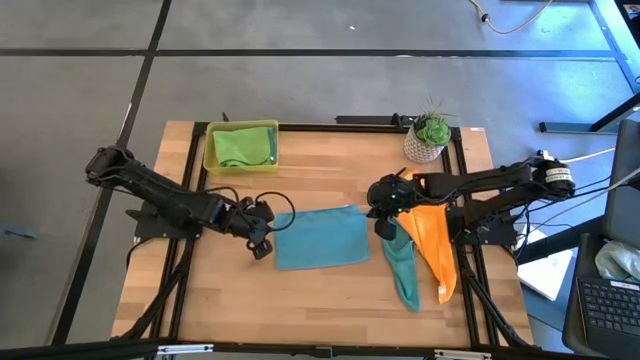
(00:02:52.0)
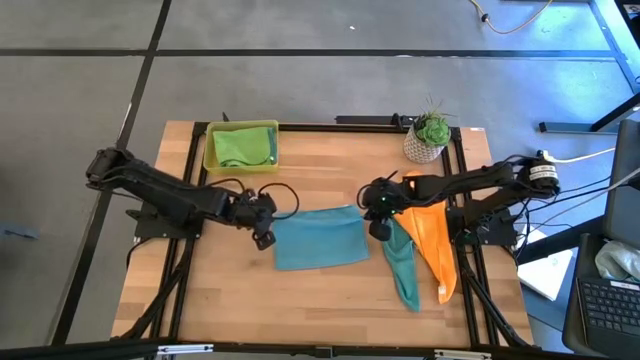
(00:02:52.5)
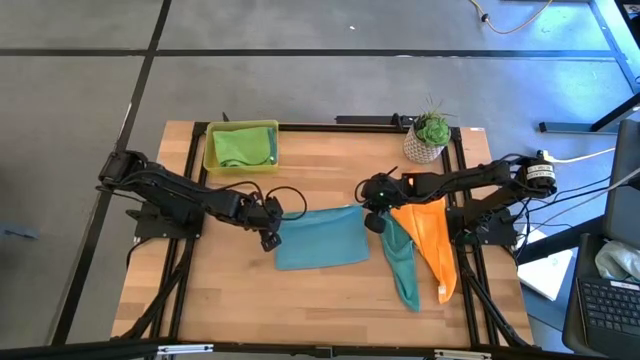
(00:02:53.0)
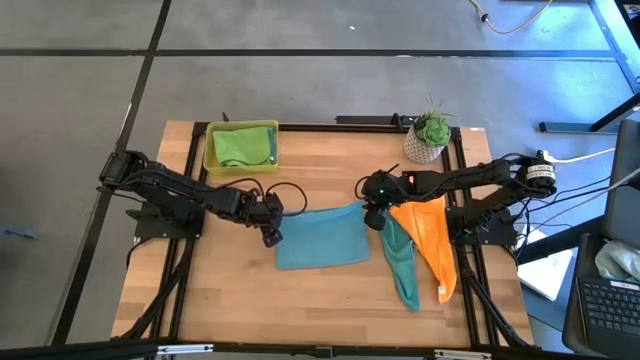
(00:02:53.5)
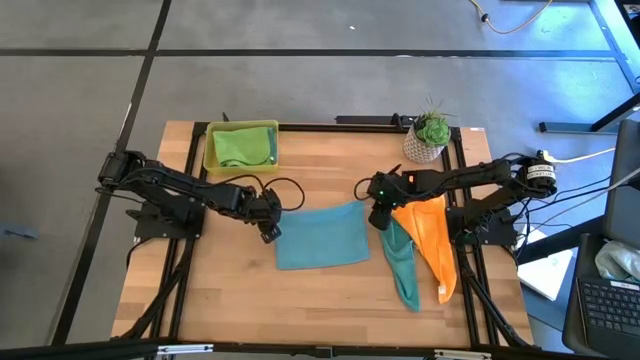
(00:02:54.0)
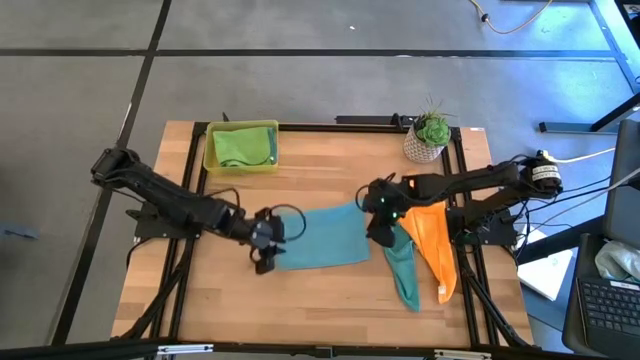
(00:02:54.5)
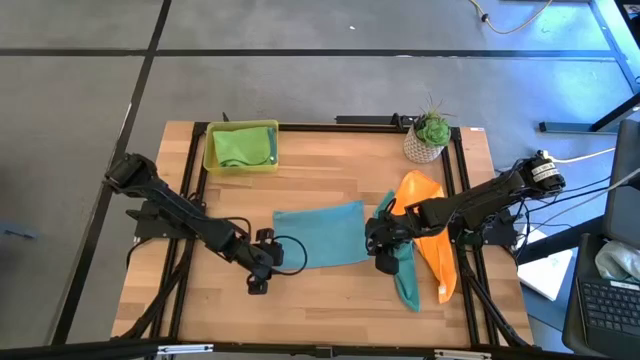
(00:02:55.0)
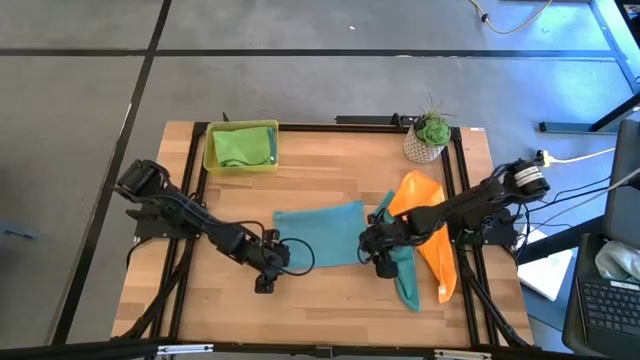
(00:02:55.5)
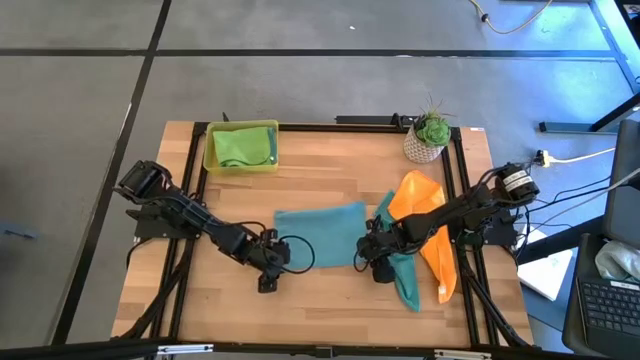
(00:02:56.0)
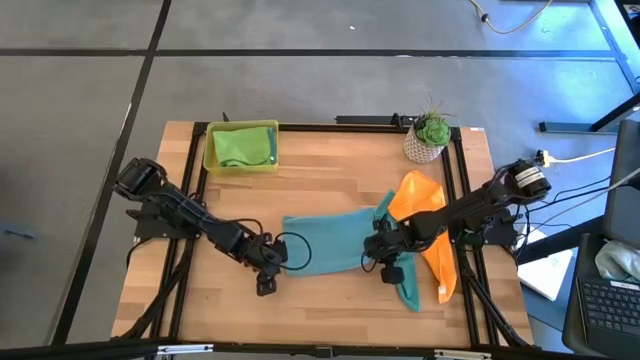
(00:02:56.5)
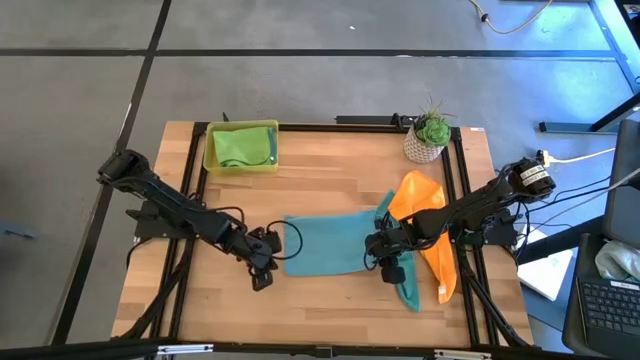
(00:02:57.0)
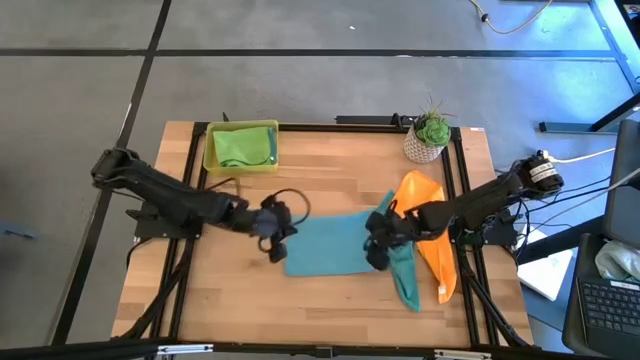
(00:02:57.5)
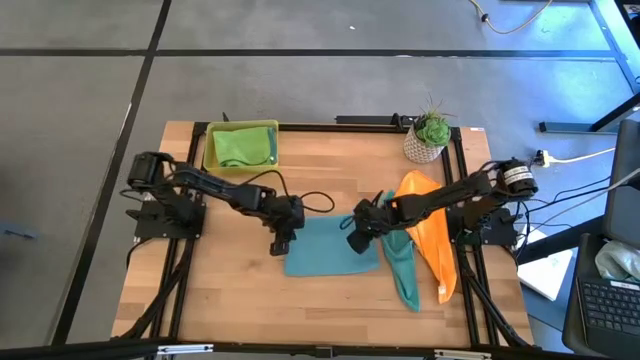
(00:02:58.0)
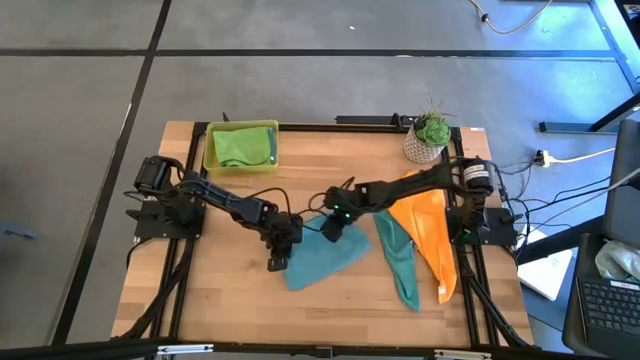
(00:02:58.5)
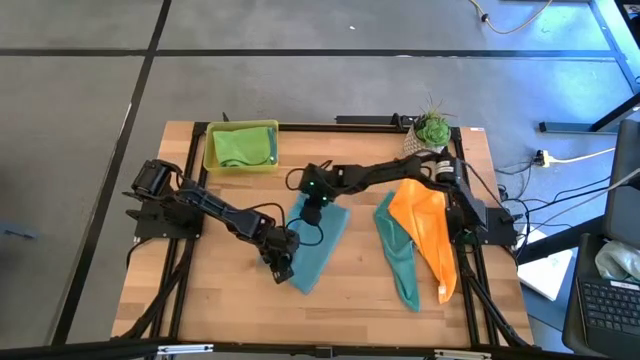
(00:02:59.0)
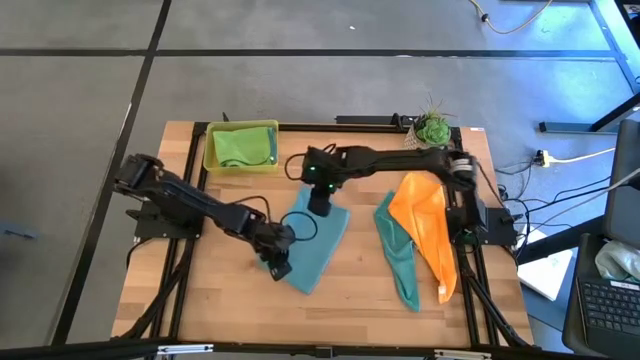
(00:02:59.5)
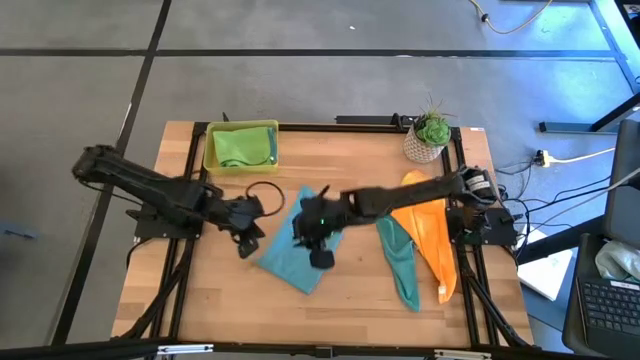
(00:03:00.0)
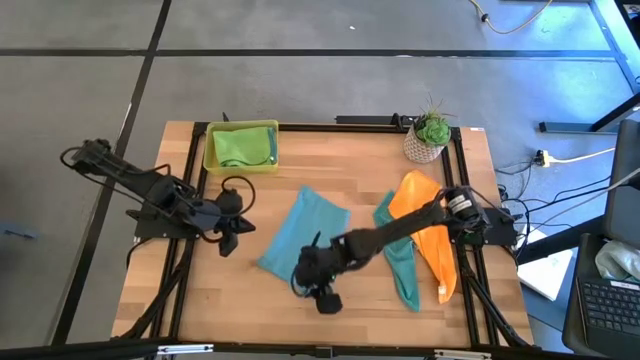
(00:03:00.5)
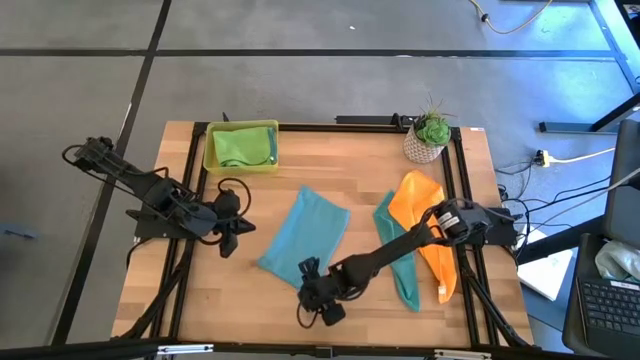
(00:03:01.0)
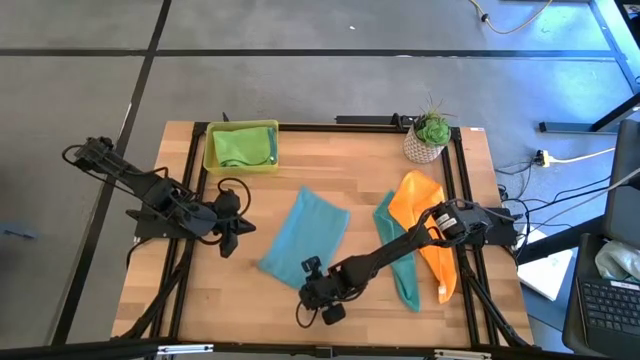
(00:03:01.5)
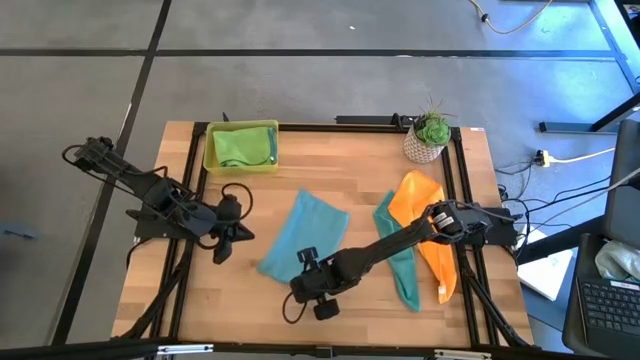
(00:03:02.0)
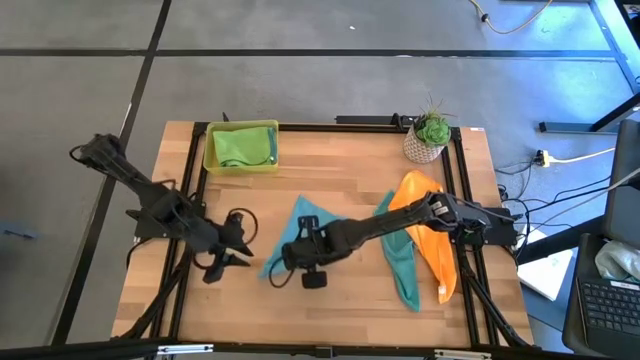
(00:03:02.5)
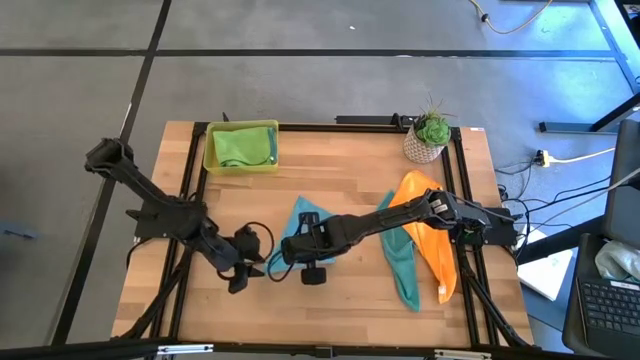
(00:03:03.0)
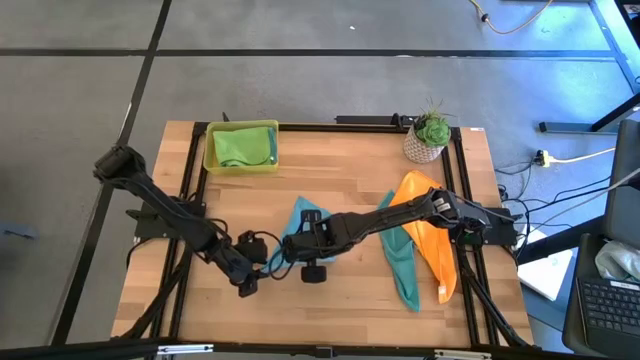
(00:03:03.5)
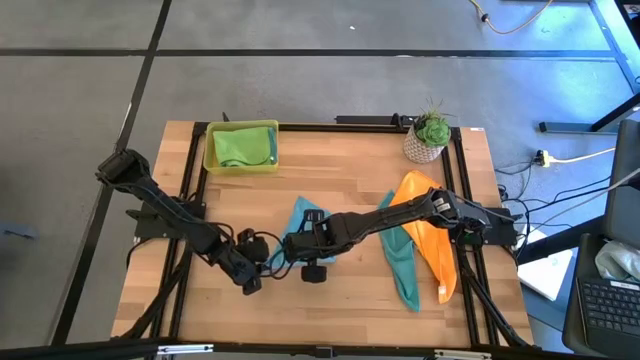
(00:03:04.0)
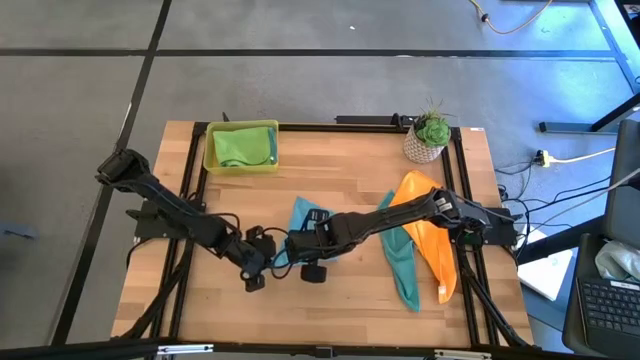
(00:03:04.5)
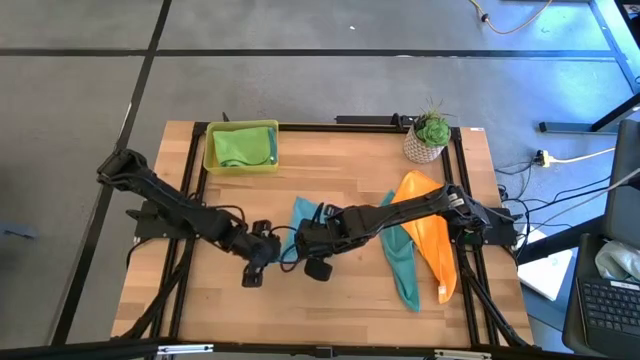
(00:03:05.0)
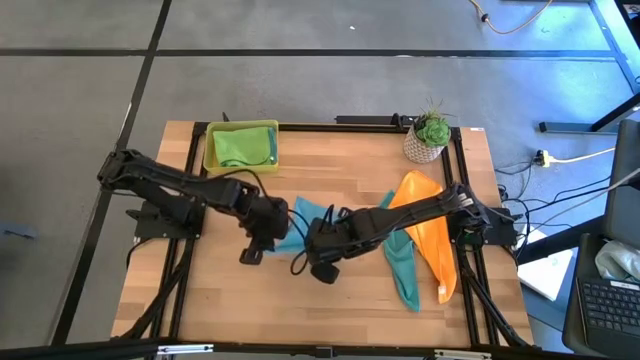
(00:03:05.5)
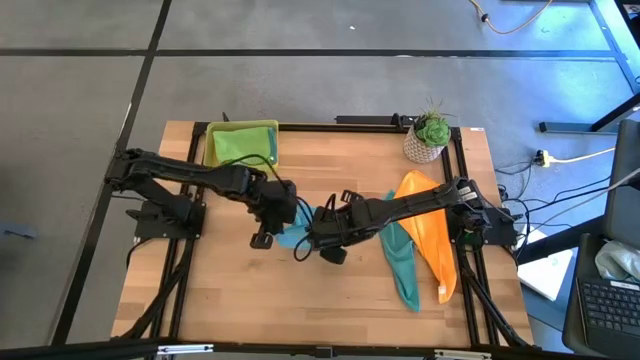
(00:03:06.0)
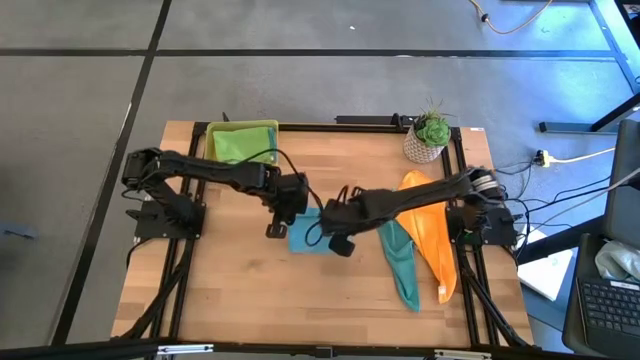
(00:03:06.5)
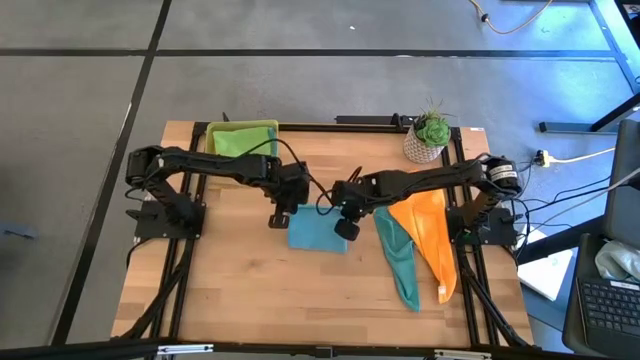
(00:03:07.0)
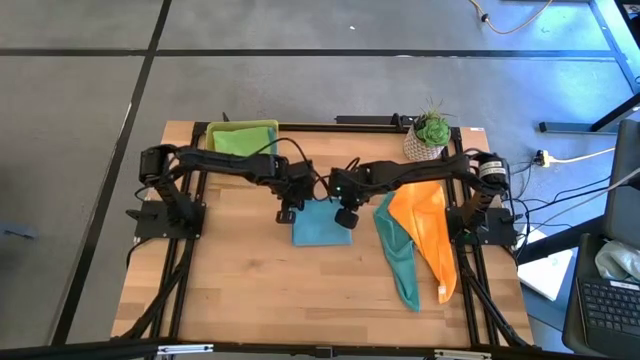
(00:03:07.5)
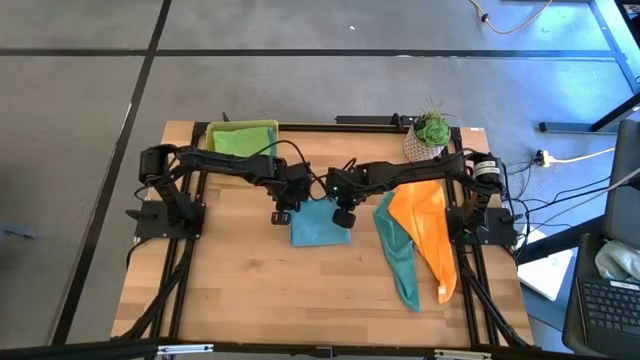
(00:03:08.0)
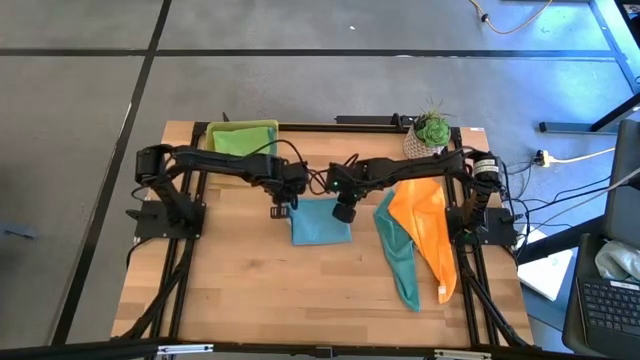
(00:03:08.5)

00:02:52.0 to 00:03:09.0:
Task: Fold microfiber towels
Fold the left blue towel

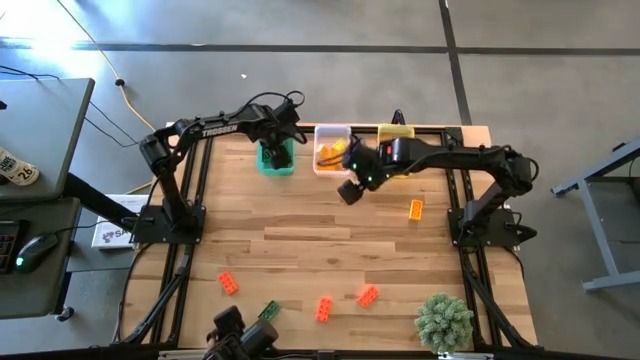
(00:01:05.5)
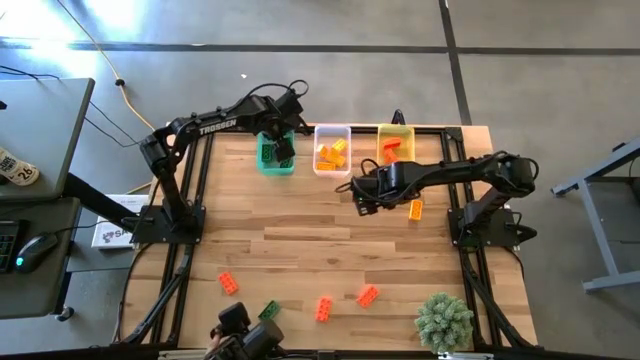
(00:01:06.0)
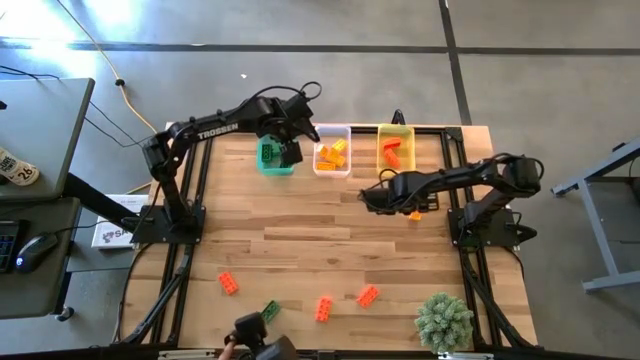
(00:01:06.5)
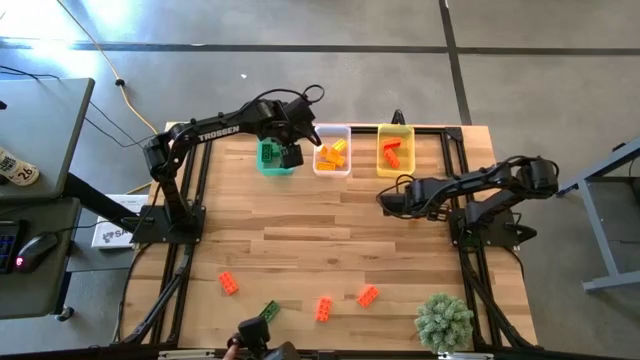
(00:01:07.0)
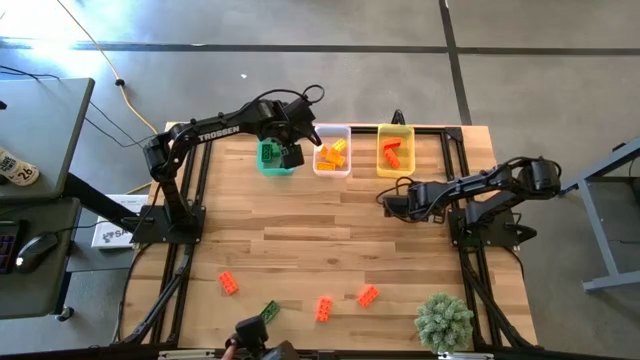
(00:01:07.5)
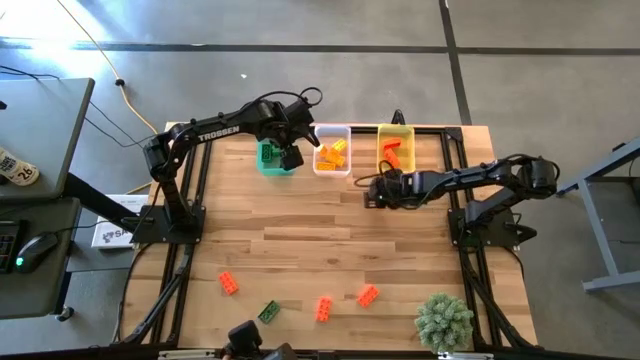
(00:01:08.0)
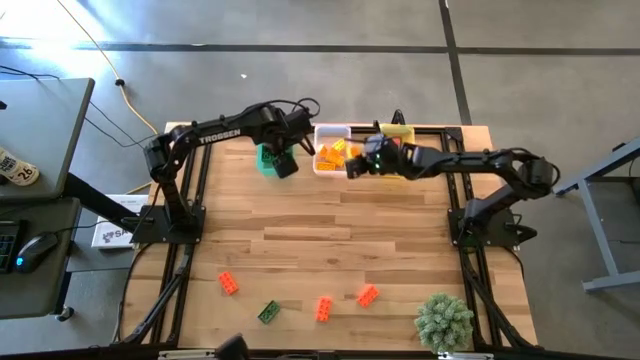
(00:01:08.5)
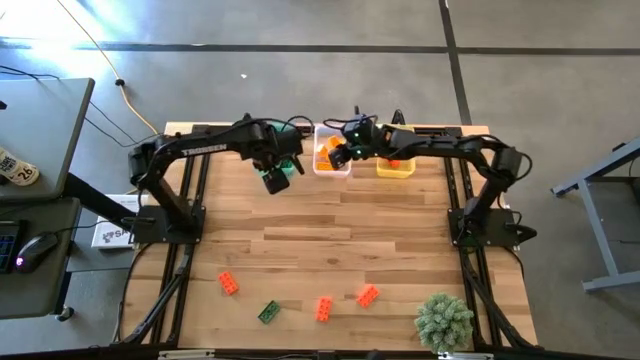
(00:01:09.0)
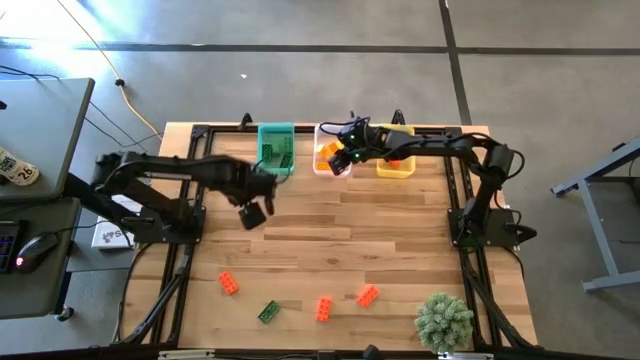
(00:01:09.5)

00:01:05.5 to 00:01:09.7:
Task: Sort & place blocks by color
Put the yellow game piece into the white bin
